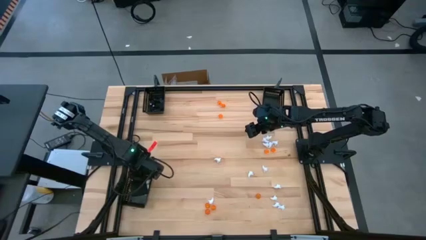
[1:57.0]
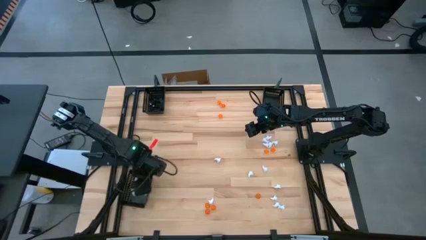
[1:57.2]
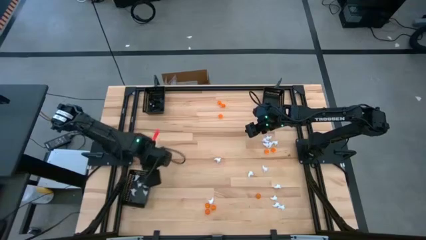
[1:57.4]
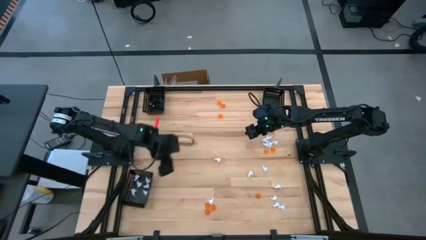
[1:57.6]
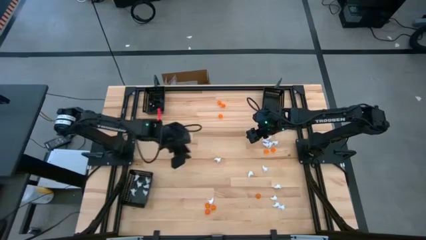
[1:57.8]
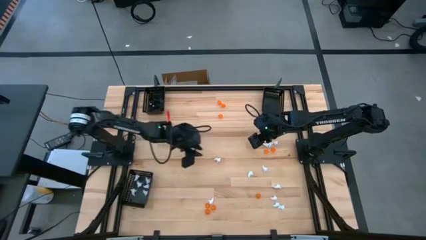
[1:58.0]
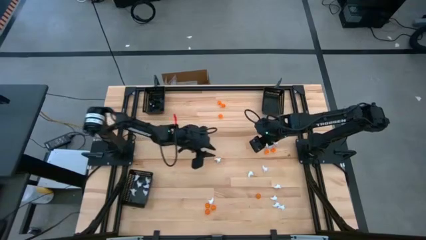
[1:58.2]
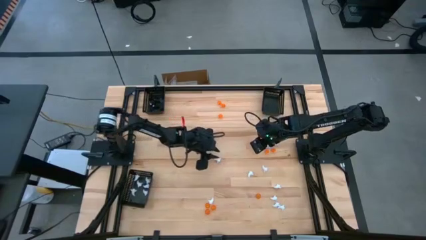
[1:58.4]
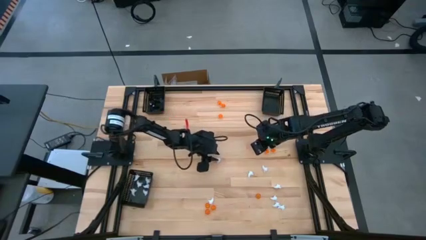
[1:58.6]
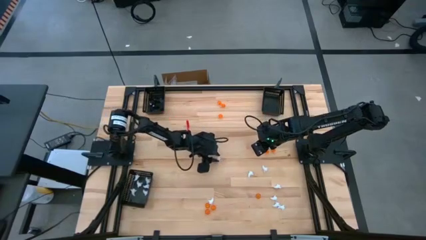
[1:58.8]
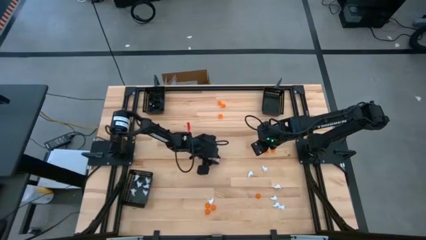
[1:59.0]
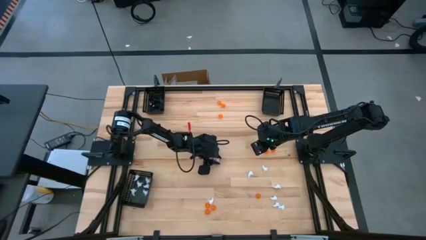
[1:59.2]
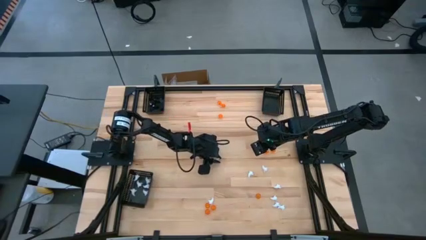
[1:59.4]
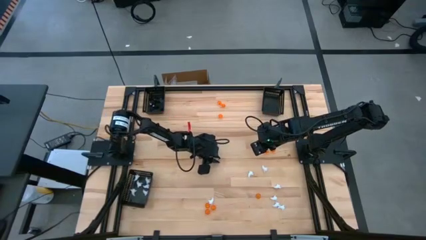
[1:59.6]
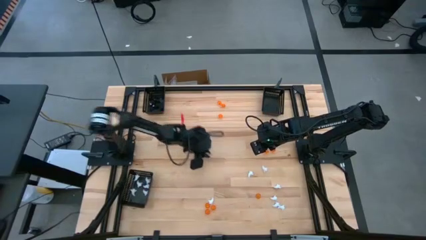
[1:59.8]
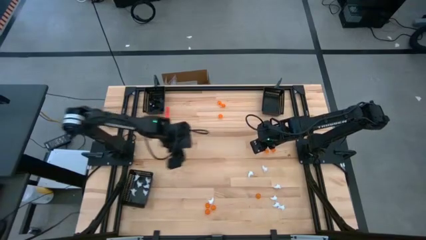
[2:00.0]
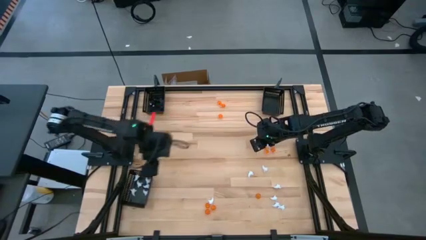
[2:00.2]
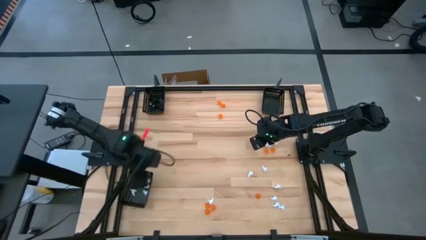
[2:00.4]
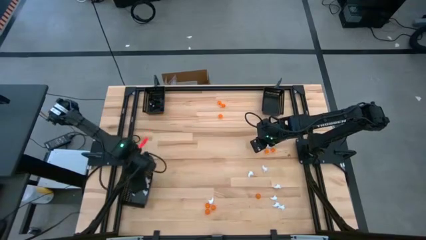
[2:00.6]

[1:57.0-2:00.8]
Task: Sort Halloween decoration
Put the white ghost toy into the bottom black basket

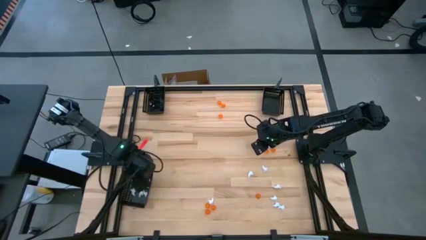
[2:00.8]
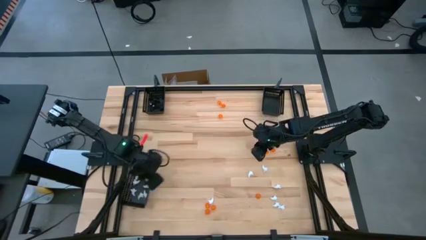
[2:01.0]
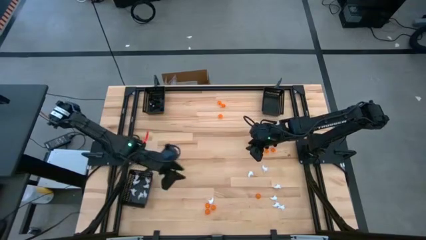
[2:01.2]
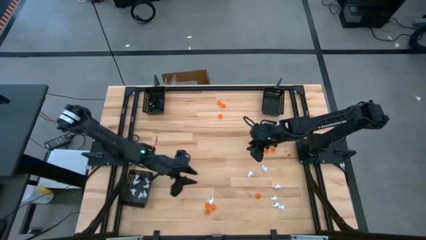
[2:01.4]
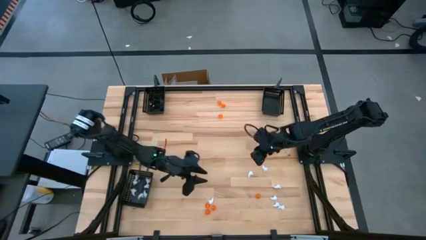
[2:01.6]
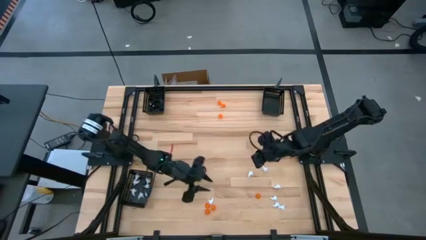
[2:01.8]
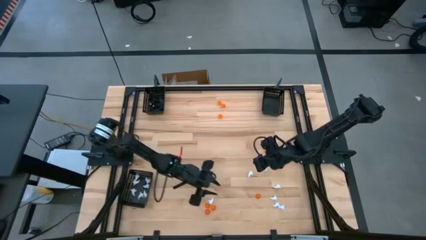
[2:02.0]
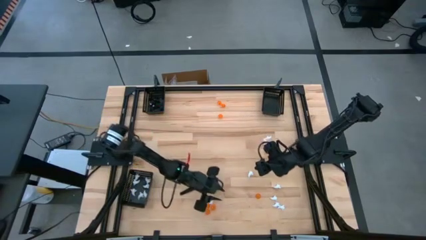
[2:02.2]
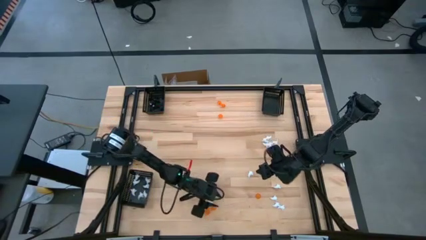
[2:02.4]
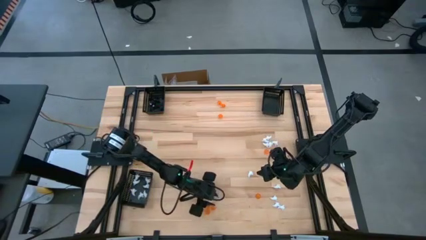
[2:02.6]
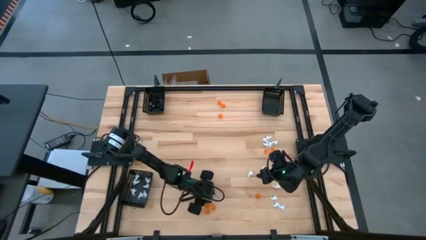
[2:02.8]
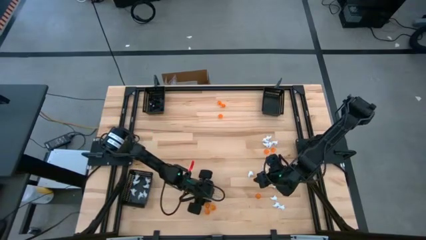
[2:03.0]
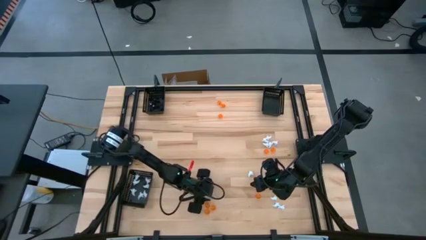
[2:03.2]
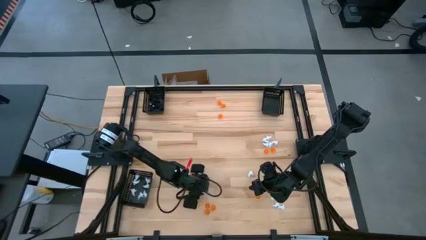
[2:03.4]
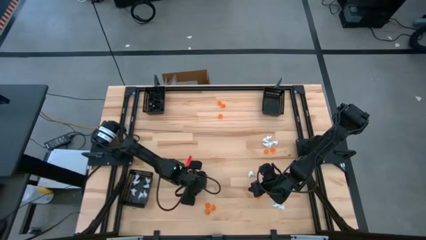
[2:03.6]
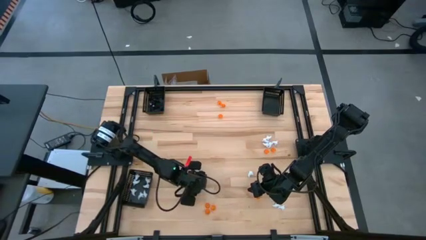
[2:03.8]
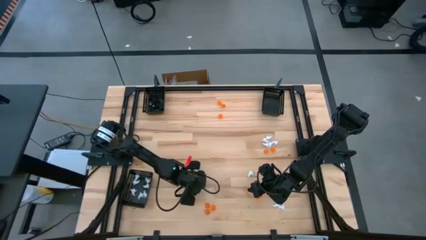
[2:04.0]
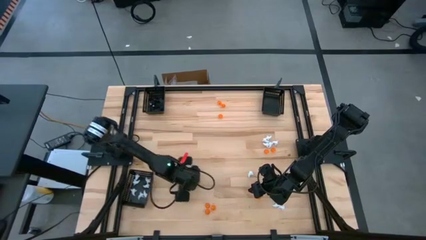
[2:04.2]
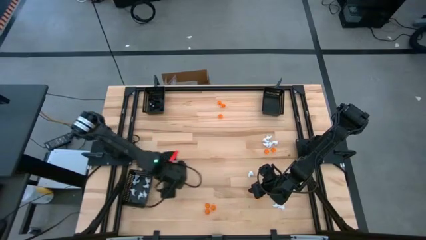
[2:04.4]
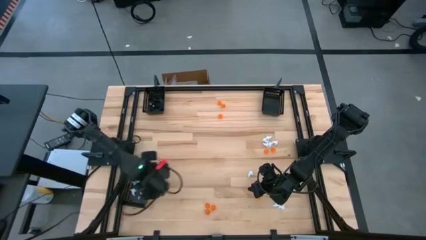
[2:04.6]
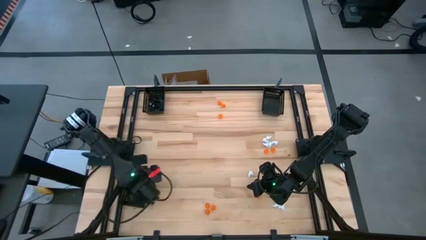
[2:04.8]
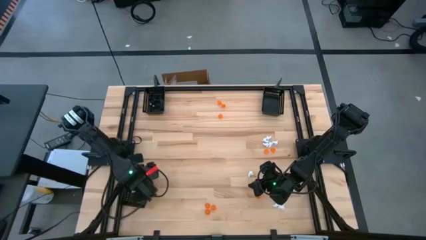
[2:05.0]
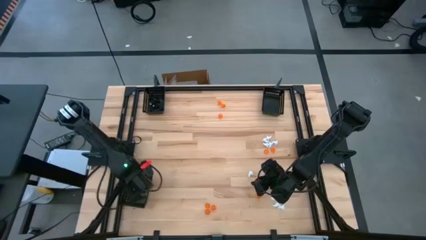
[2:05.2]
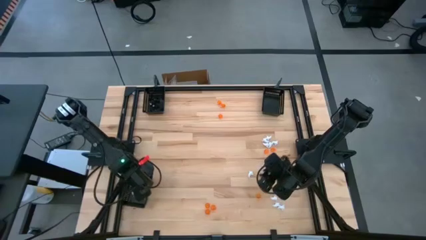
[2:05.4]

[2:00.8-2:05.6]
Put the white ghost toy into the bottom black basket

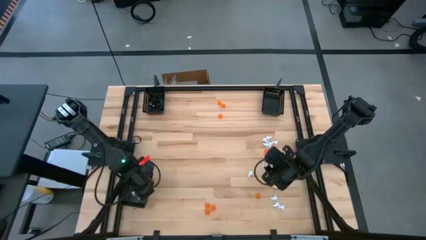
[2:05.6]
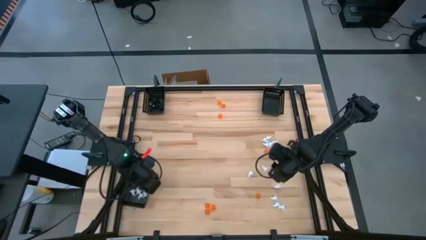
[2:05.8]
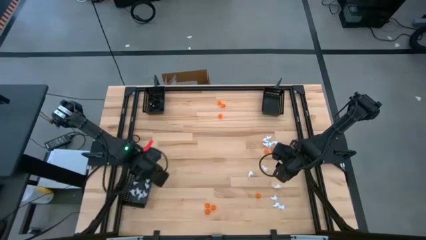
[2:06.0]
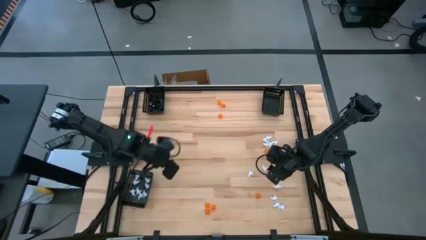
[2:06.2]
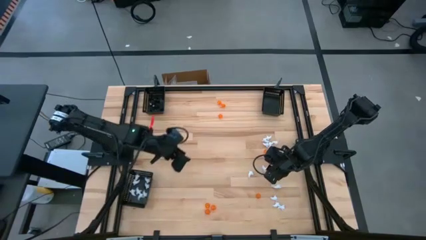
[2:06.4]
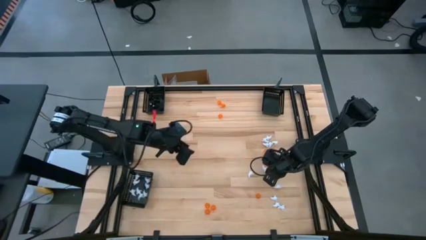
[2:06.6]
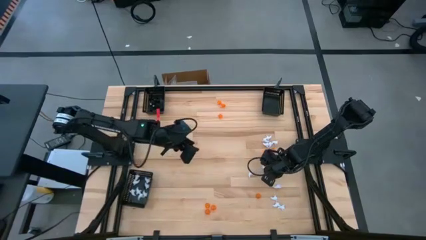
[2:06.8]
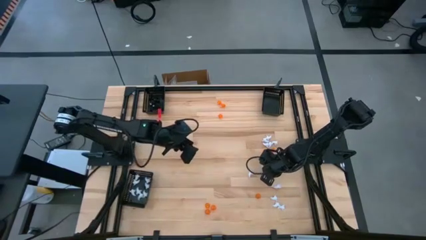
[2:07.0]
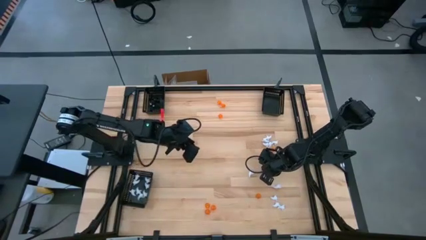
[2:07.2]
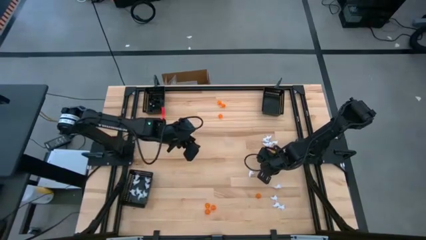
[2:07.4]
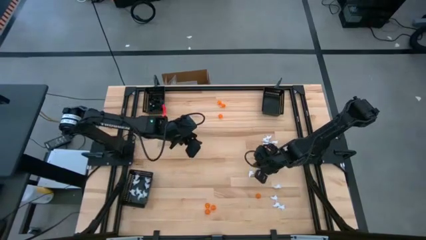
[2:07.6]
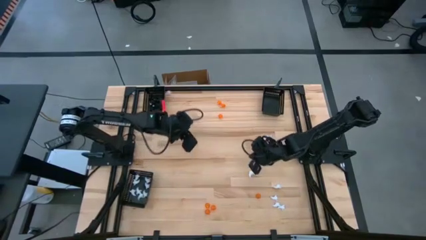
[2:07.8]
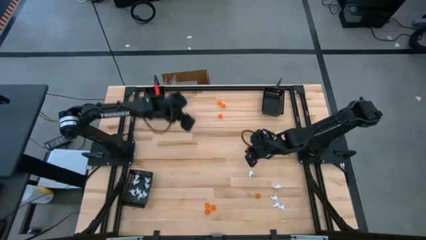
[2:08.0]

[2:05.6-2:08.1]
Put the white ghost toy into the bottom black basket

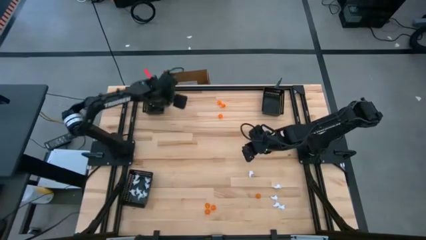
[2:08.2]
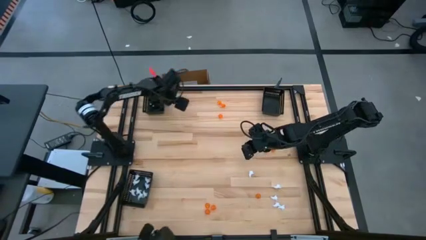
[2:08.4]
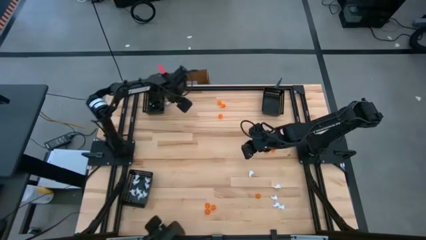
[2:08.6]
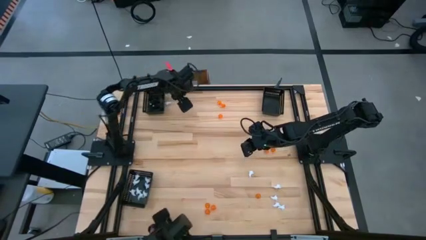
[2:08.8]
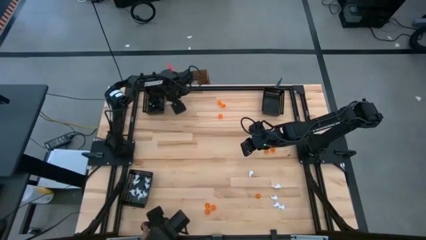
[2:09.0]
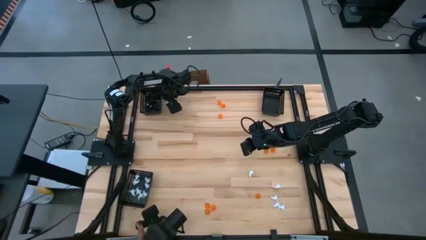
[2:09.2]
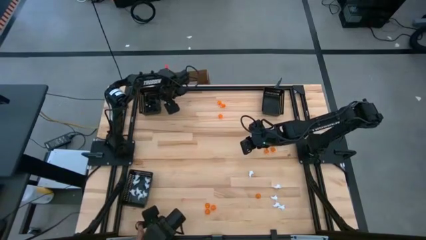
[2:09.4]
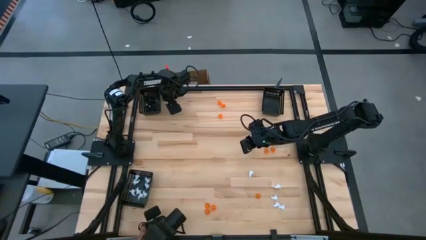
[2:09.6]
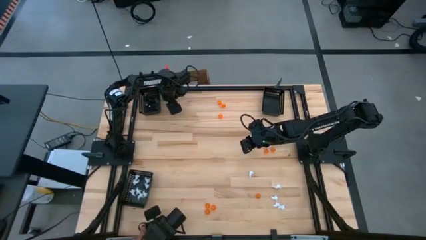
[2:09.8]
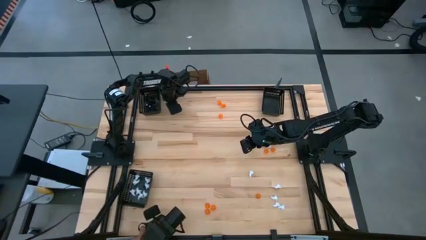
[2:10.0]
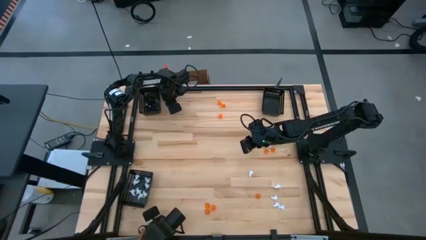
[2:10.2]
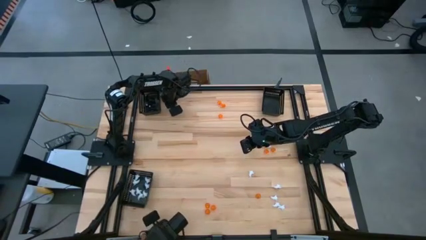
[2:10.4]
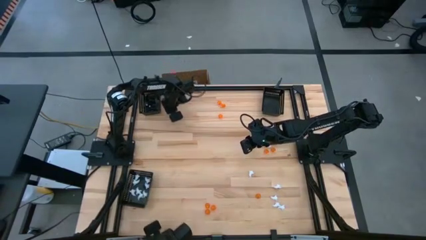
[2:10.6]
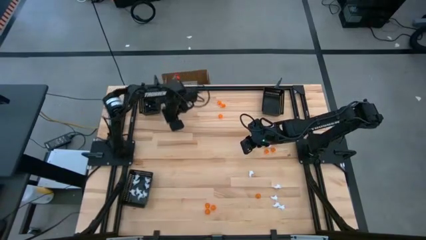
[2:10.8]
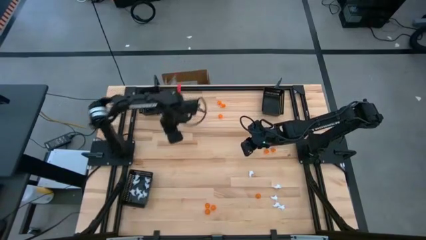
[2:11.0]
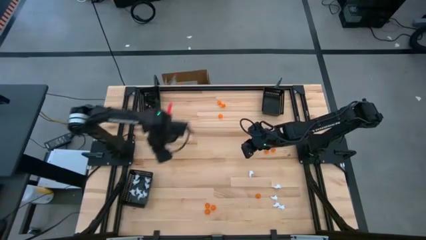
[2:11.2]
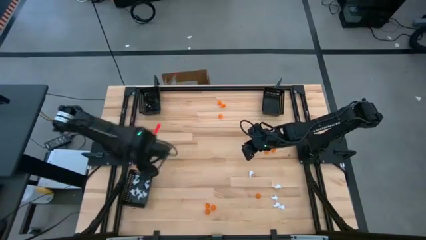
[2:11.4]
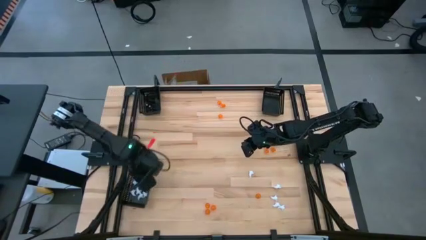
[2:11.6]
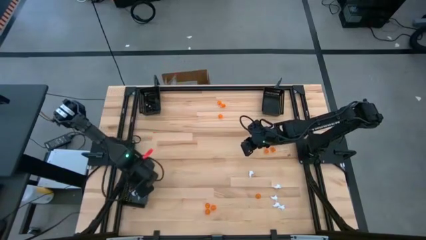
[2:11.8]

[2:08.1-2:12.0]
Put the white ghost toy into the bottom black basket

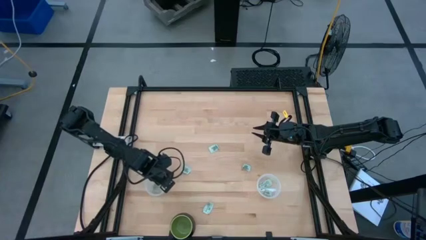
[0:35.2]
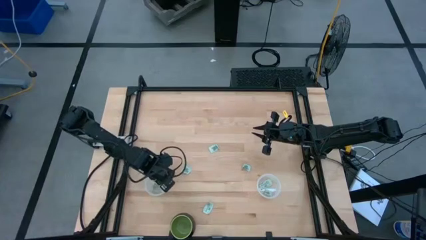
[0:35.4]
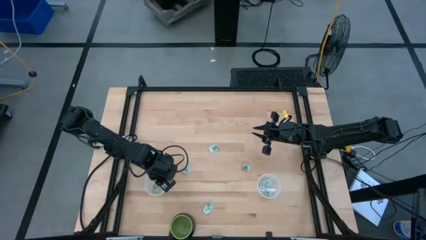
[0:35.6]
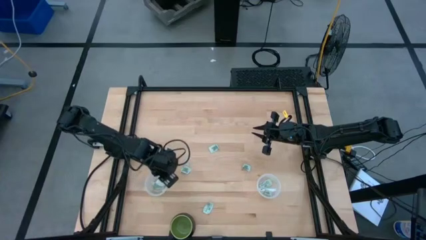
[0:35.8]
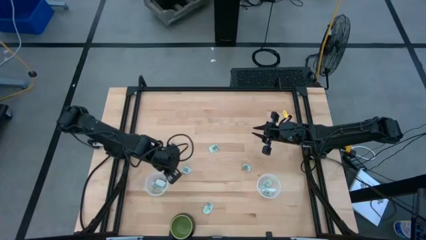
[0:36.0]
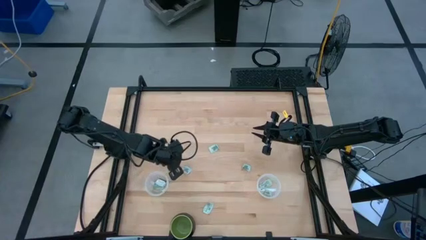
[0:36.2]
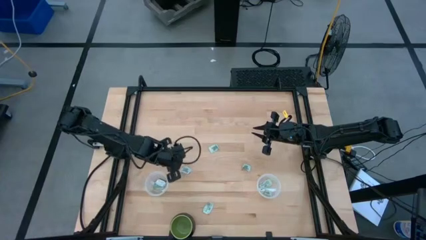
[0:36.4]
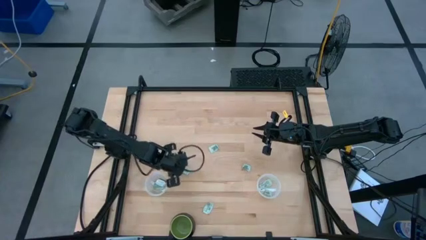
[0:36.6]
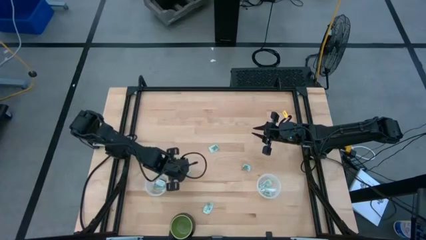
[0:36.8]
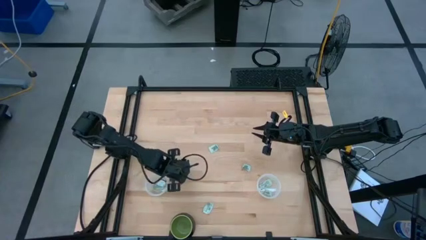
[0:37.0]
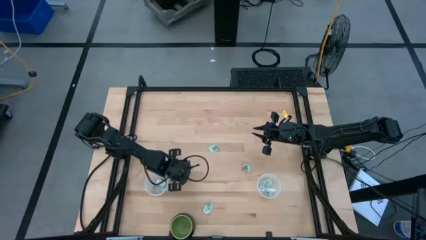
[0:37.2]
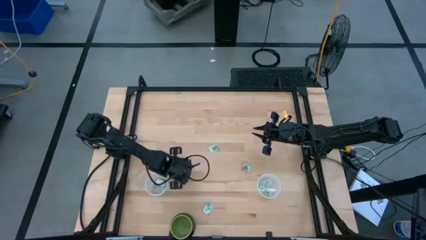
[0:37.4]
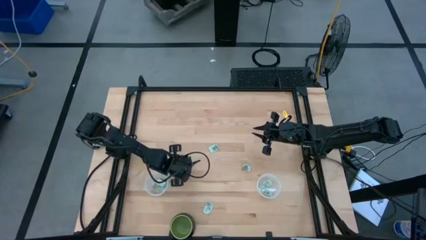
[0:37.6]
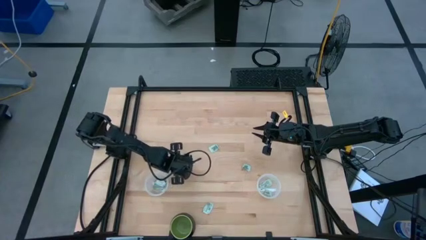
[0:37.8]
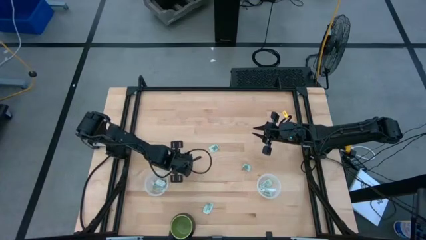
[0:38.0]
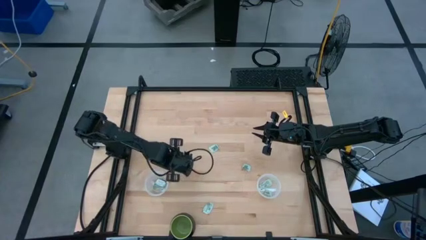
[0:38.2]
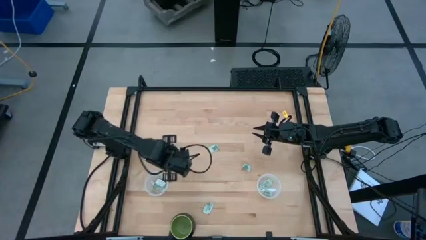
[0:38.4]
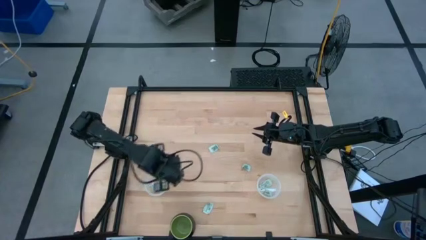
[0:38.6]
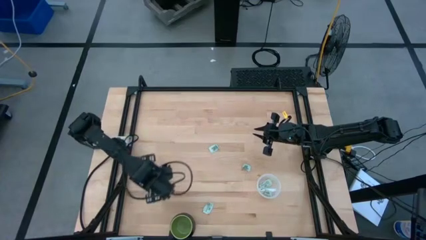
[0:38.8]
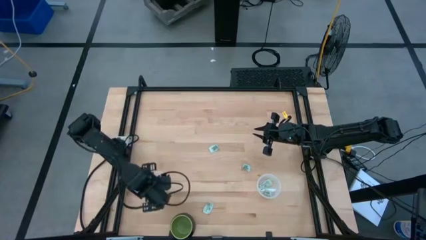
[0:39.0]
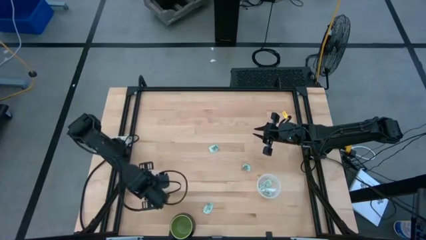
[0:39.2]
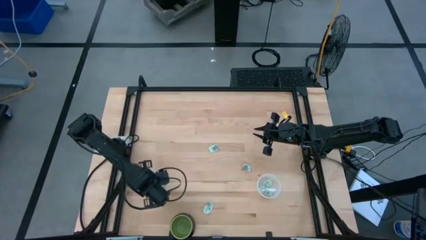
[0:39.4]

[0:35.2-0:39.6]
Task: Pick and place Stevia / Truvia into bins
Put the white stevia packet into the left transparent container
